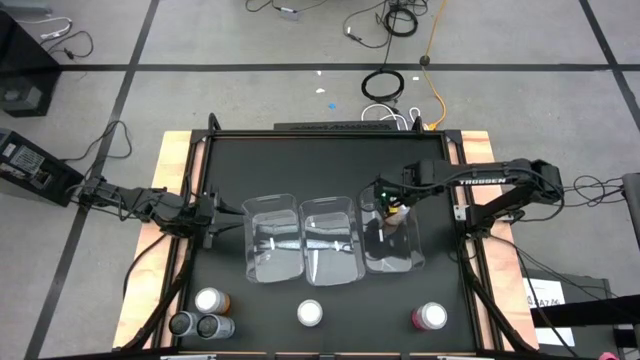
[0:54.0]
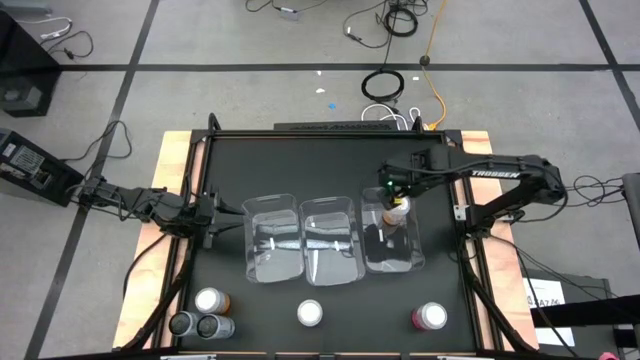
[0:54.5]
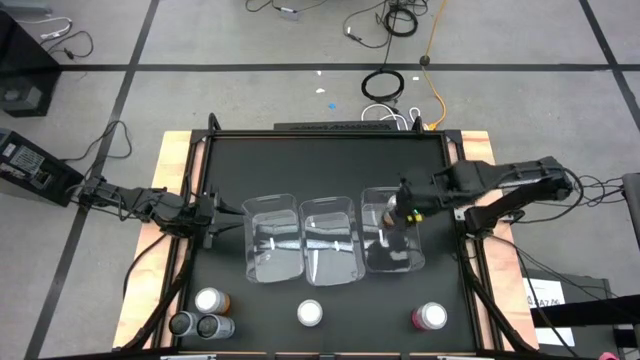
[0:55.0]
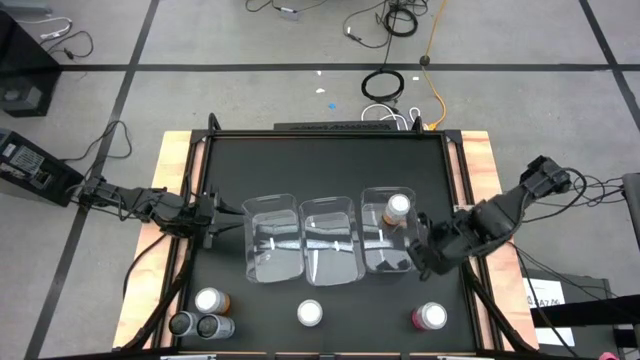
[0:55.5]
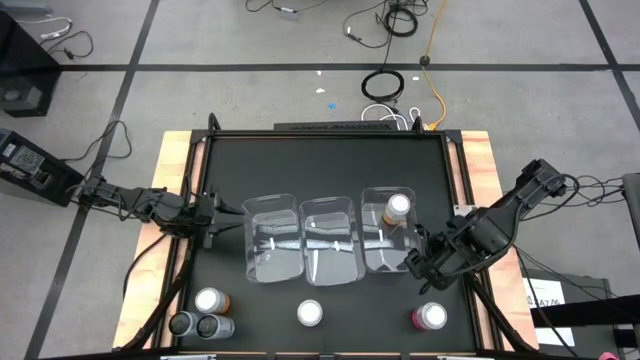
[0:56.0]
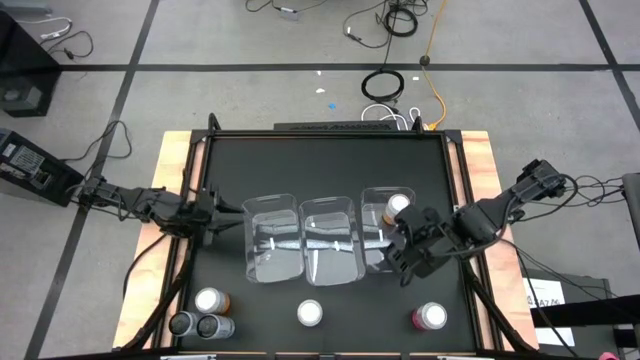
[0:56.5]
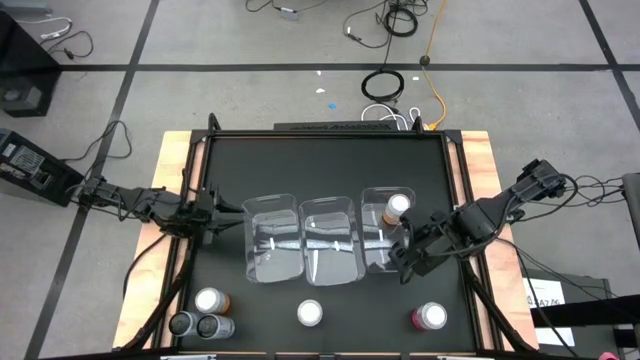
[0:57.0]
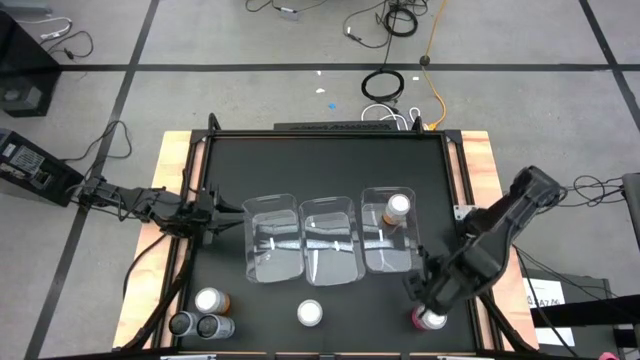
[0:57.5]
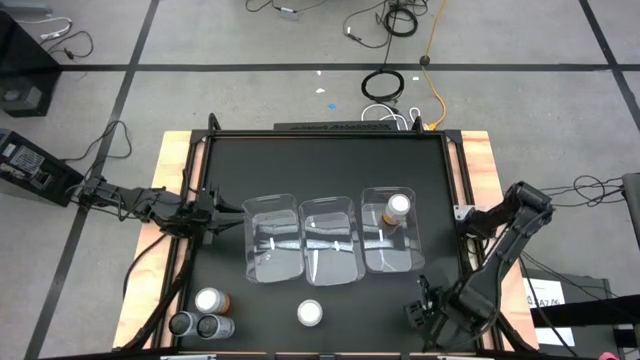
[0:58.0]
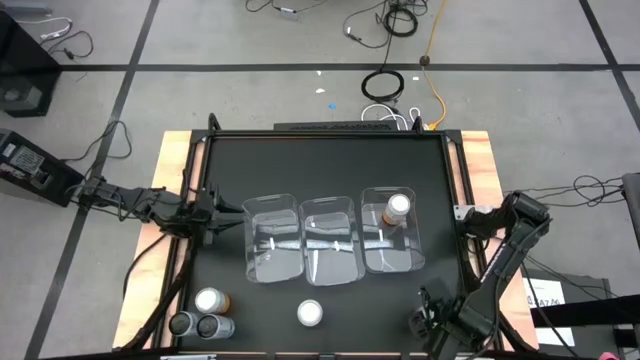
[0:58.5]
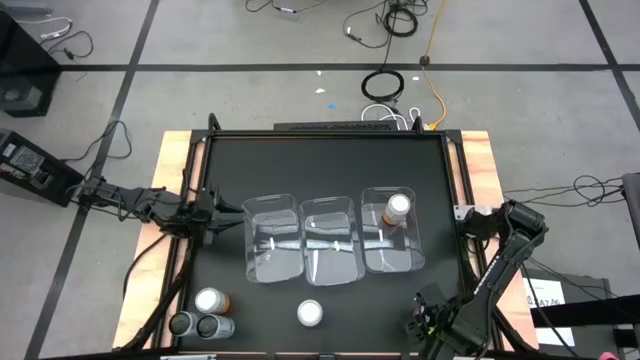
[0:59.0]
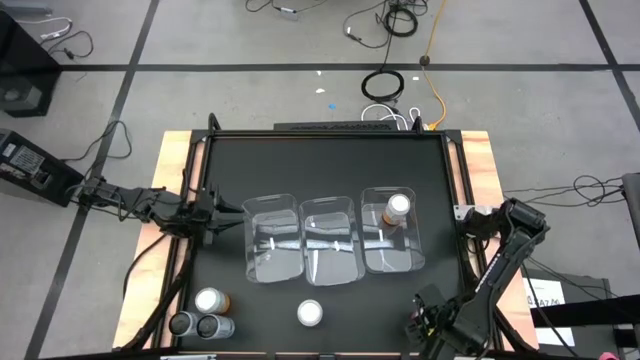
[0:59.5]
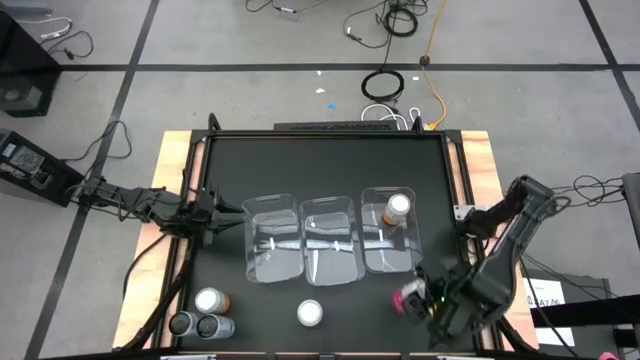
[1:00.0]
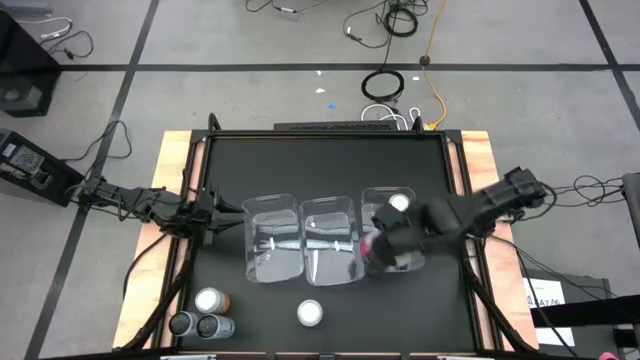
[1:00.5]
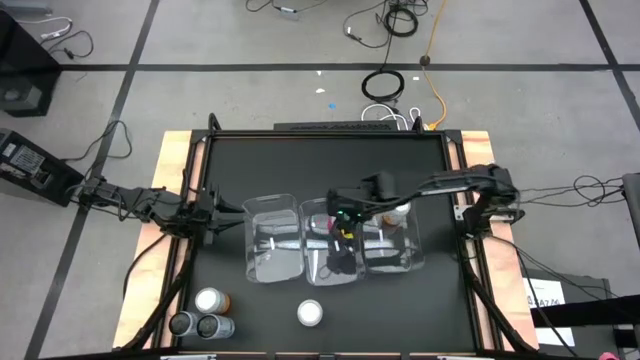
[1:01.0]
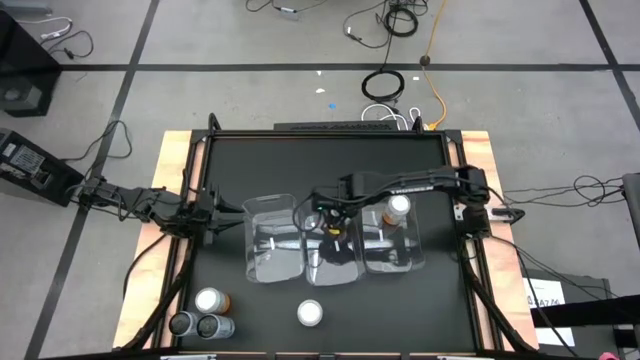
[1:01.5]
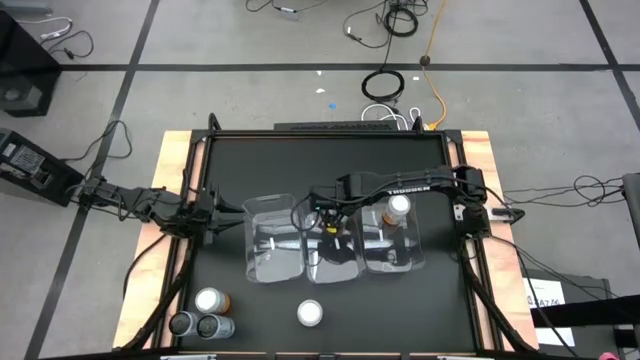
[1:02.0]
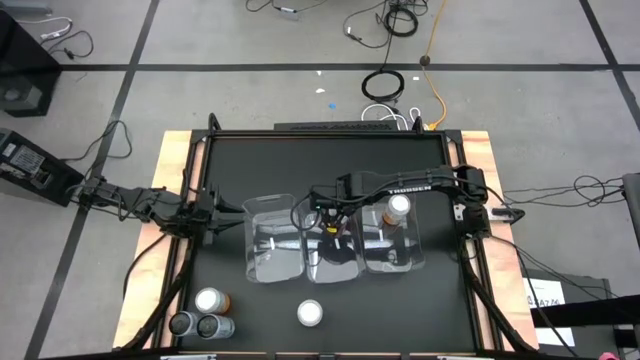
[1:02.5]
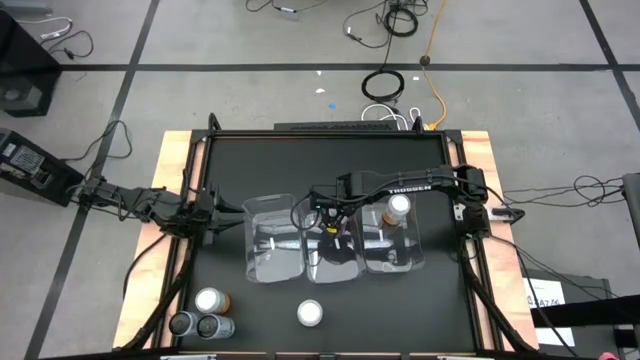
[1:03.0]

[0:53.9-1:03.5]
Task: Sort soda cans
Put the right pink soda can into the middle transparent bin

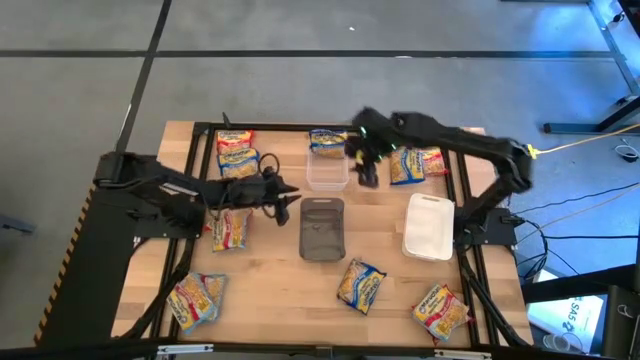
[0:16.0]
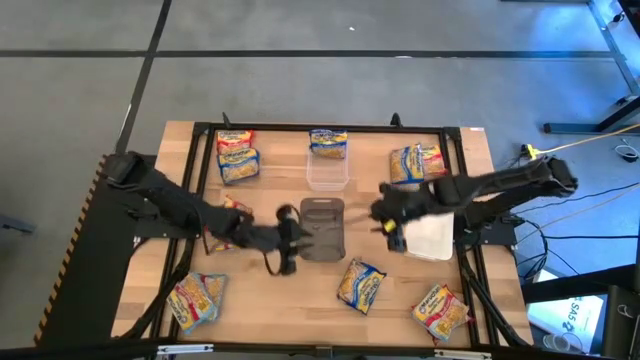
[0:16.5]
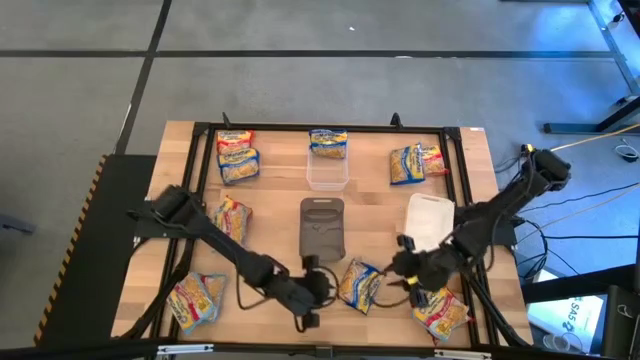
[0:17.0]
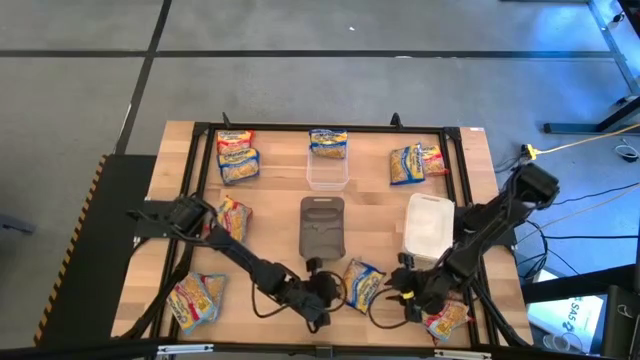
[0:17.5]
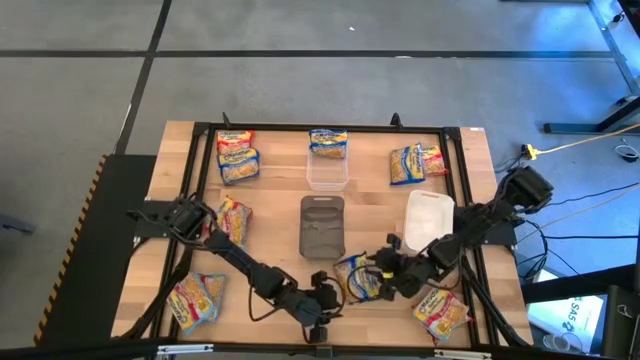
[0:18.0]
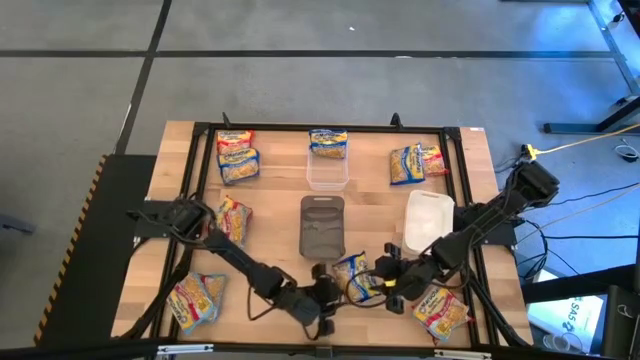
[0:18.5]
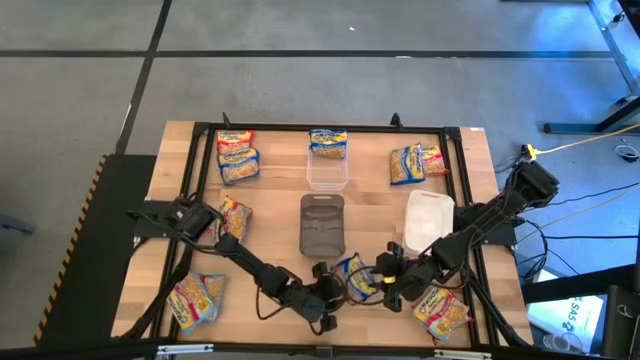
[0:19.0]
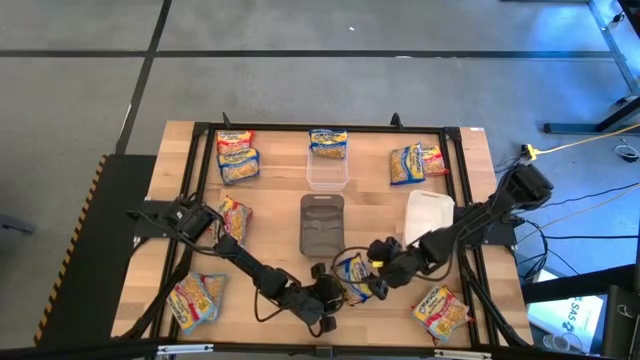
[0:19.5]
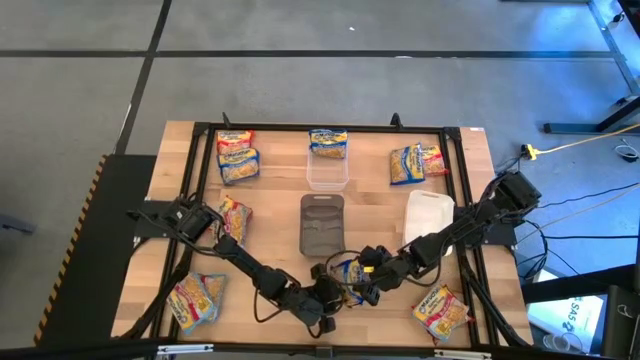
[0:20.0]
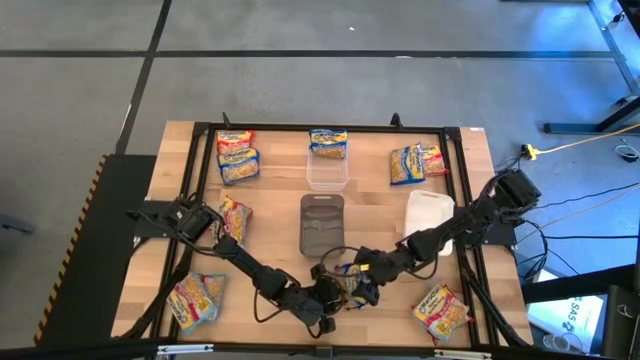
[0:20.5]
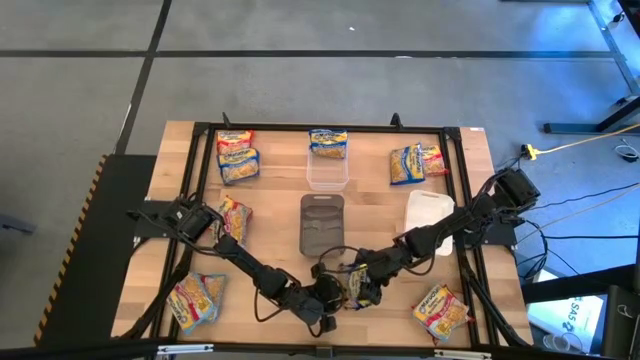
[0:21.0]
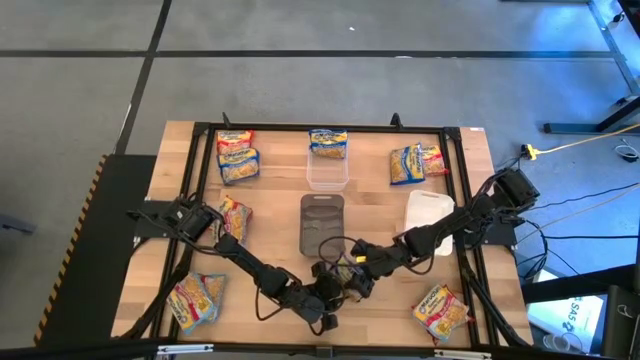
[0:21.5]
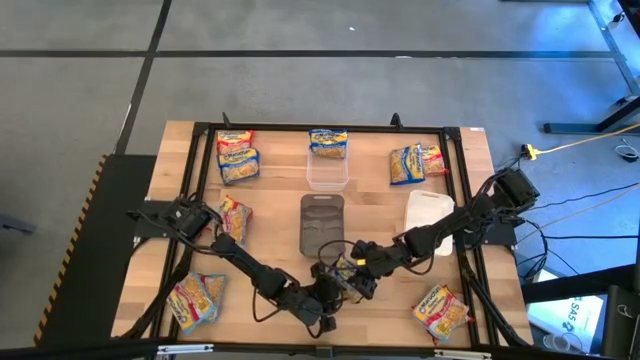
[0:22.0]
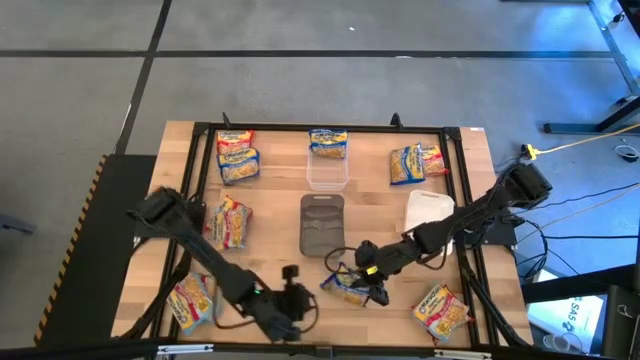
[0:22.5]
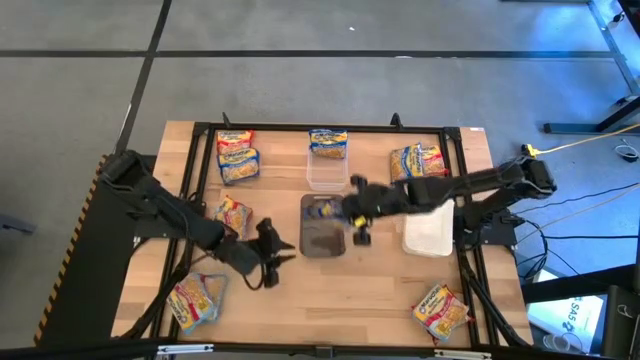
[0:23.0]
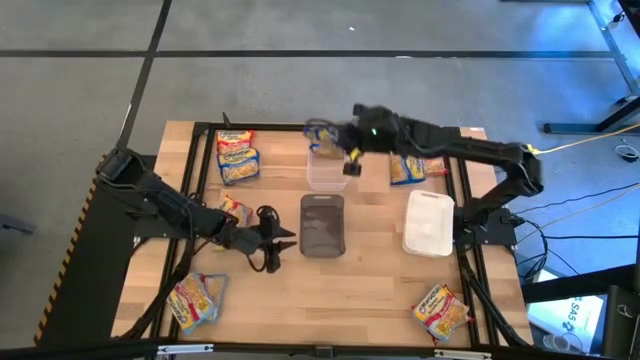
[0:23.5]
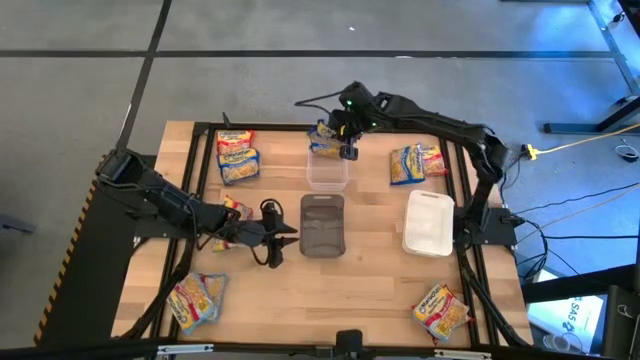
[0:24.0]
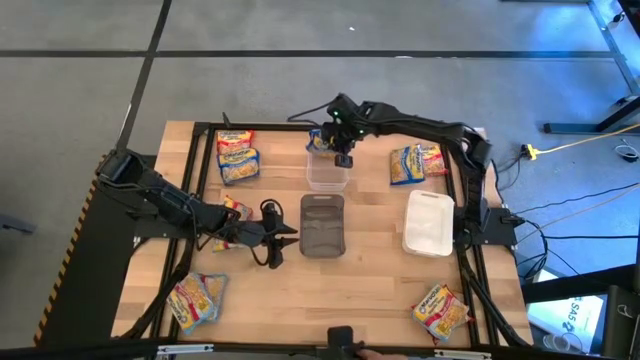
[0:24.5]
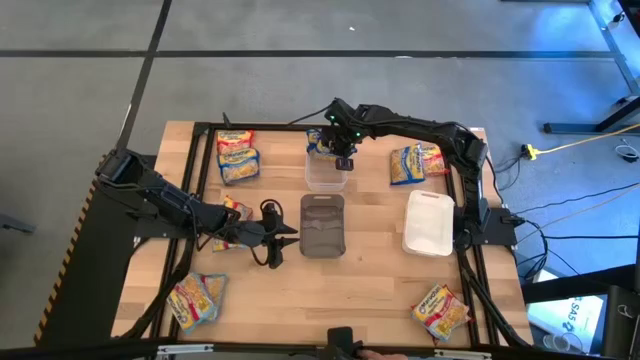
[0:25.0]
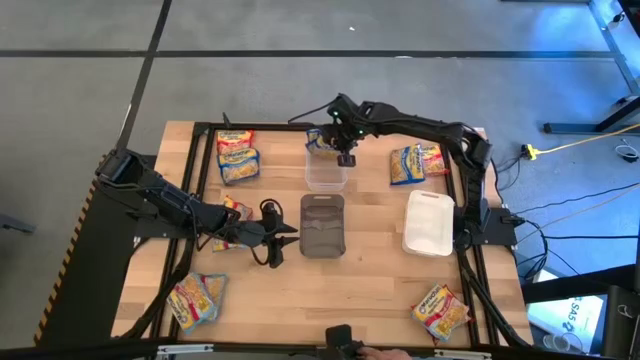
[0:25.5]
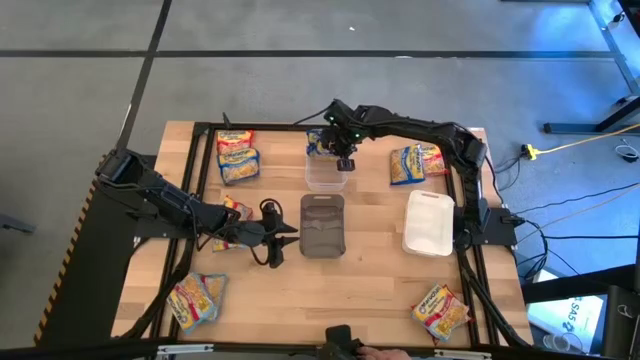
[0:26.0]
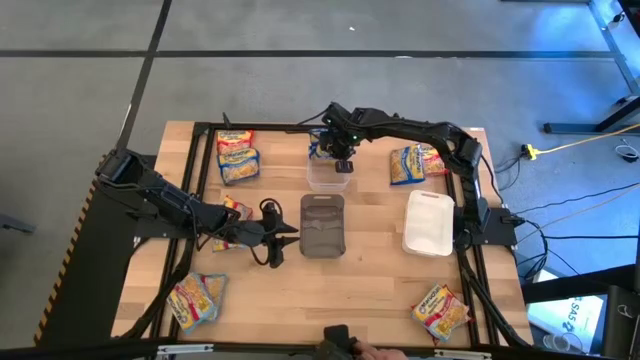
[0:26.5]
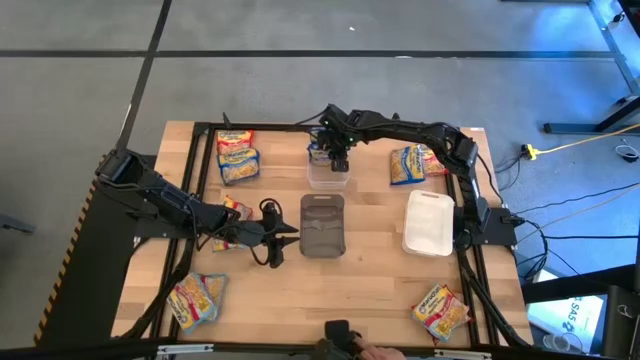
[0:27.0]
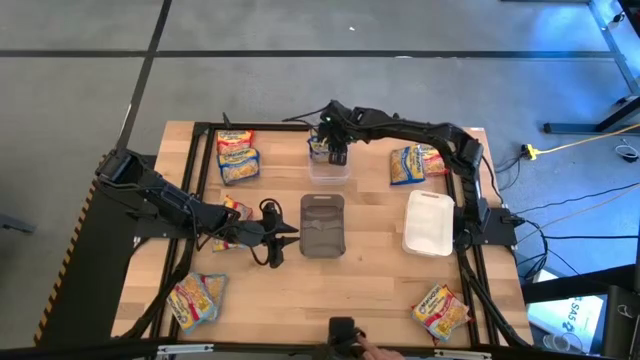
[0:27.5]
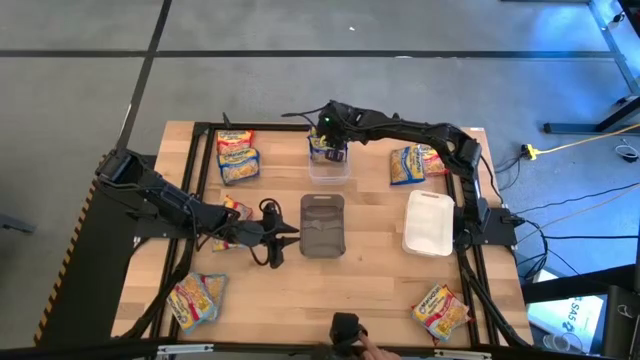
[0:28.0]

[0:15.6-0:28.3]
Task: Sort Maruchan noodles
Put the blue noodle pack into the transparent bin
